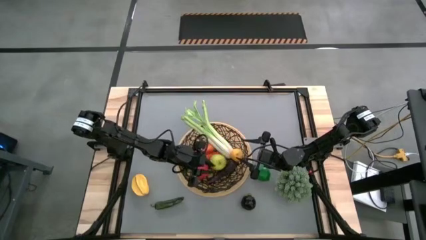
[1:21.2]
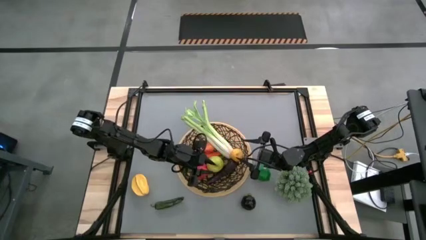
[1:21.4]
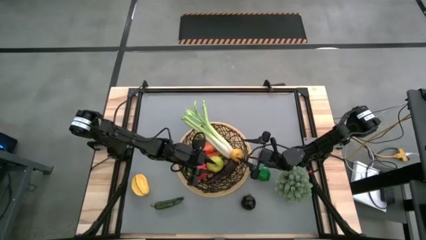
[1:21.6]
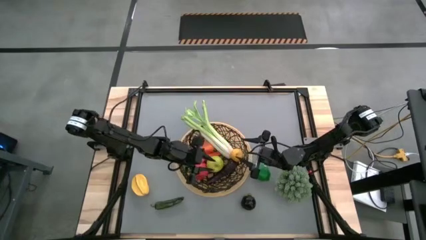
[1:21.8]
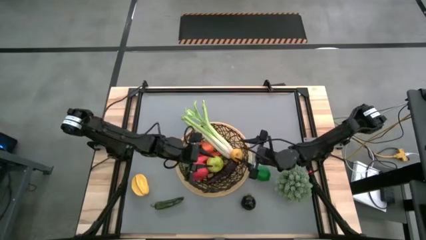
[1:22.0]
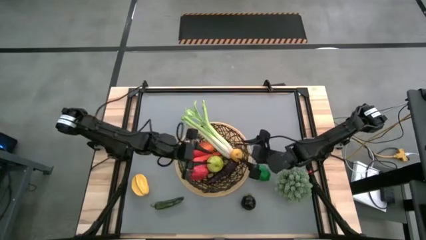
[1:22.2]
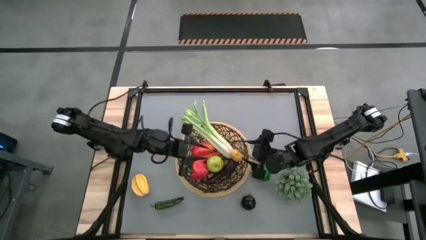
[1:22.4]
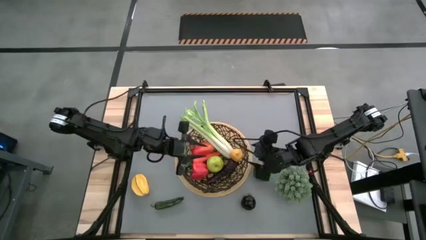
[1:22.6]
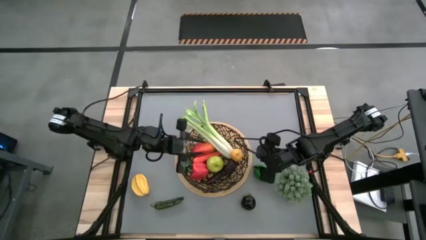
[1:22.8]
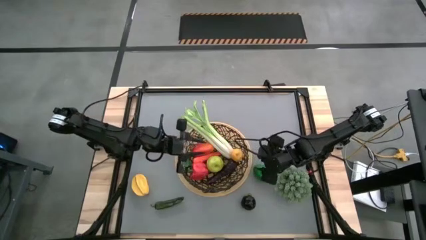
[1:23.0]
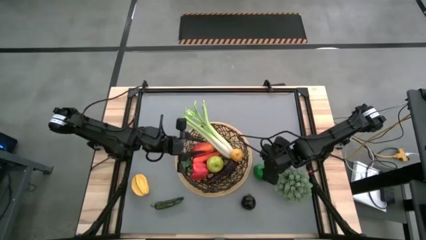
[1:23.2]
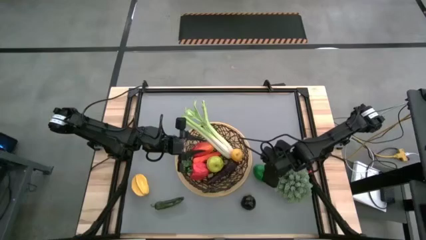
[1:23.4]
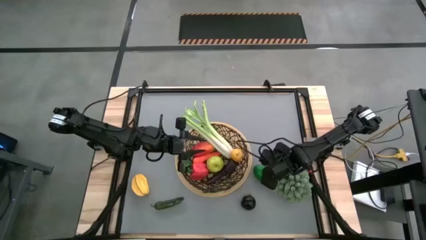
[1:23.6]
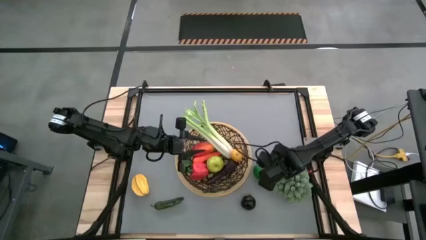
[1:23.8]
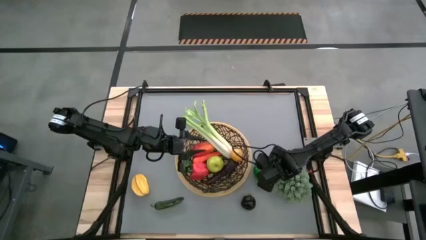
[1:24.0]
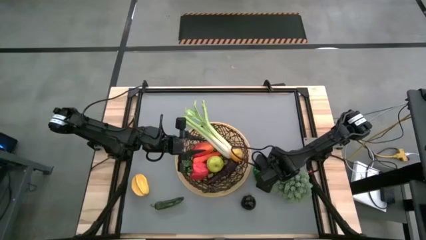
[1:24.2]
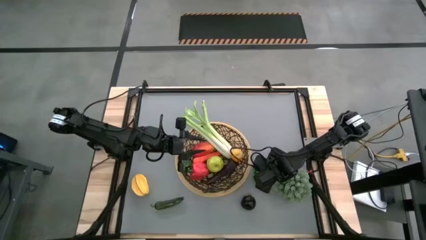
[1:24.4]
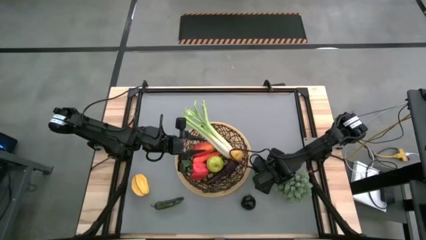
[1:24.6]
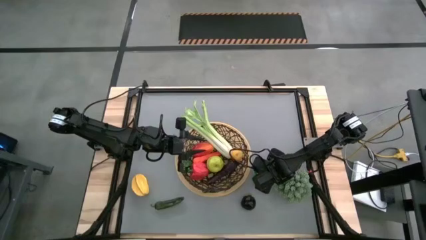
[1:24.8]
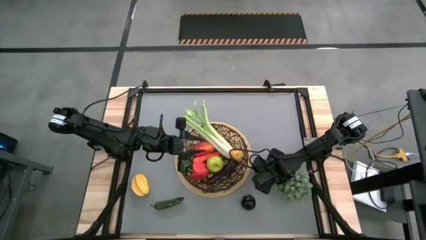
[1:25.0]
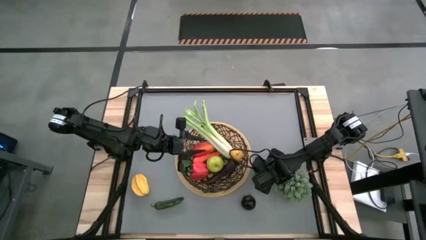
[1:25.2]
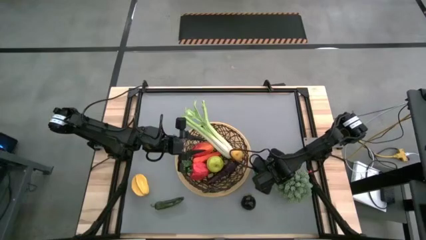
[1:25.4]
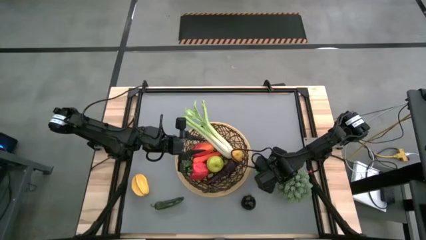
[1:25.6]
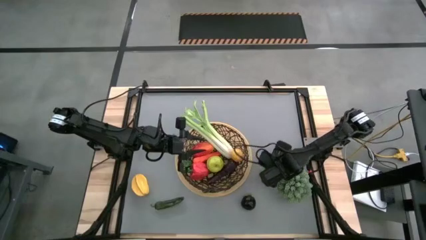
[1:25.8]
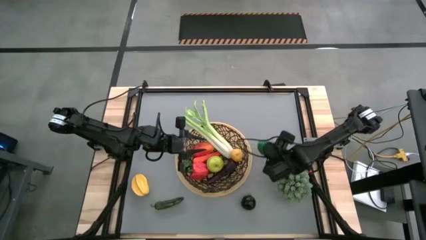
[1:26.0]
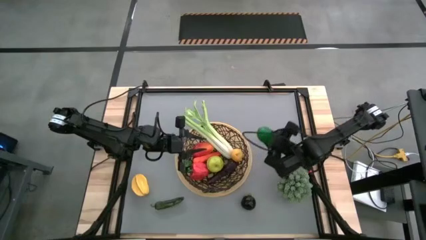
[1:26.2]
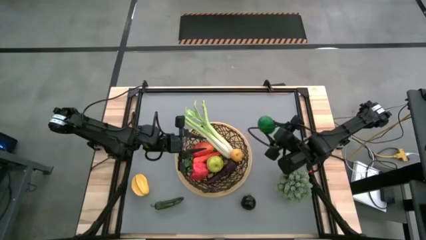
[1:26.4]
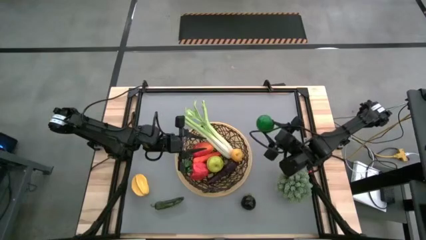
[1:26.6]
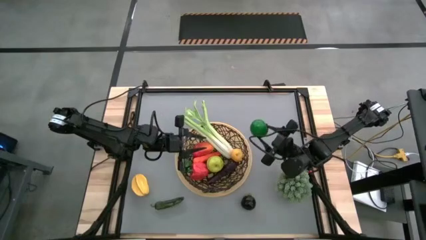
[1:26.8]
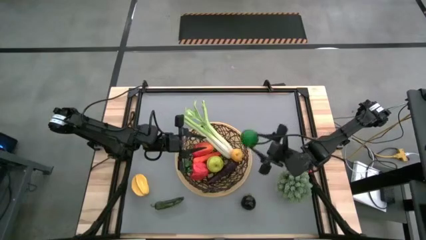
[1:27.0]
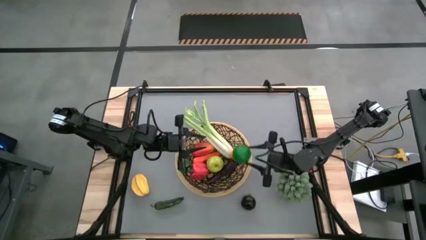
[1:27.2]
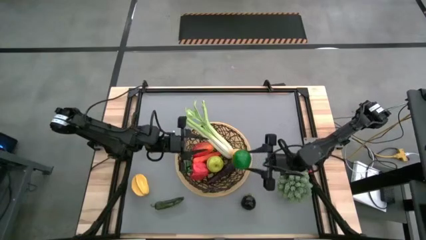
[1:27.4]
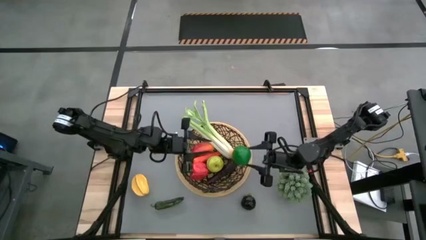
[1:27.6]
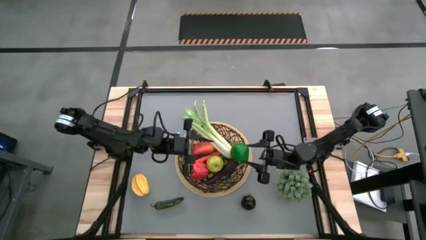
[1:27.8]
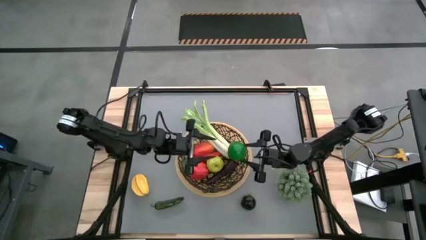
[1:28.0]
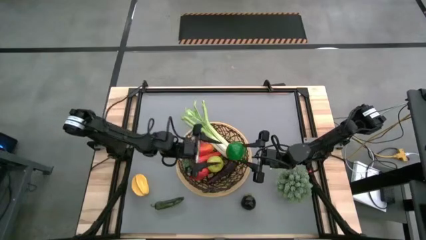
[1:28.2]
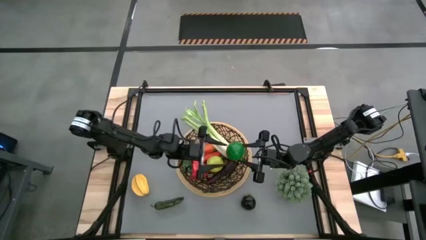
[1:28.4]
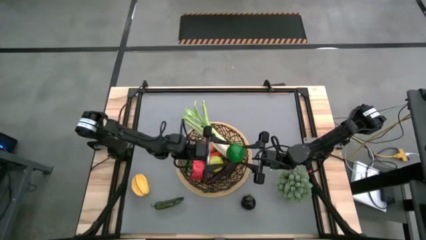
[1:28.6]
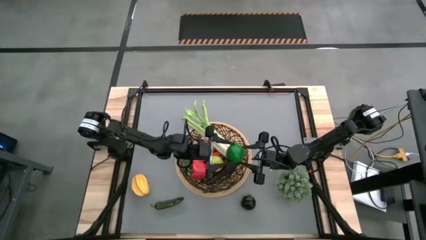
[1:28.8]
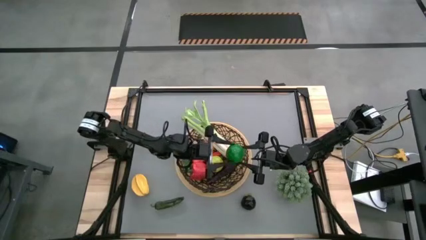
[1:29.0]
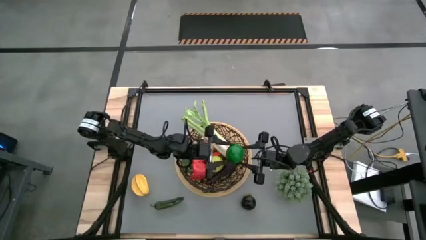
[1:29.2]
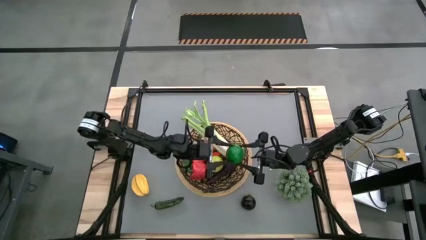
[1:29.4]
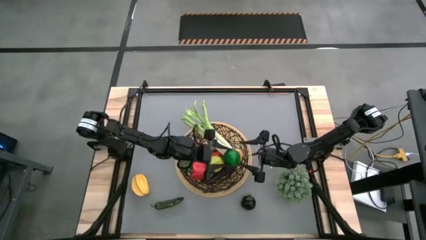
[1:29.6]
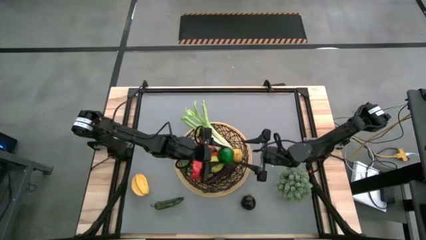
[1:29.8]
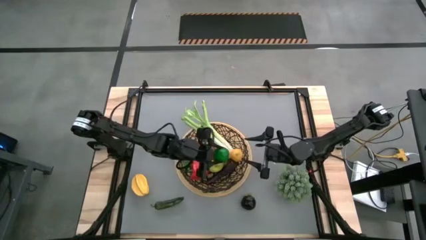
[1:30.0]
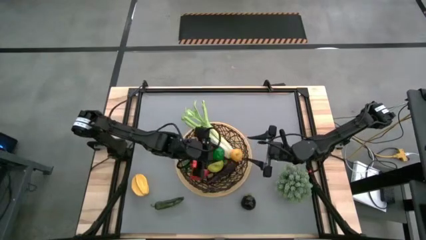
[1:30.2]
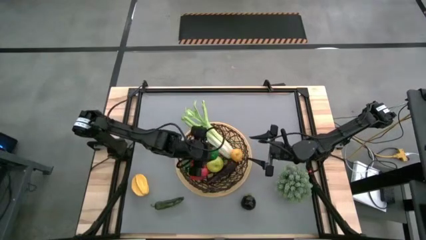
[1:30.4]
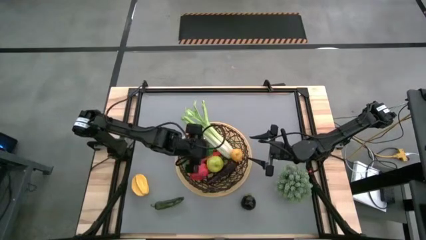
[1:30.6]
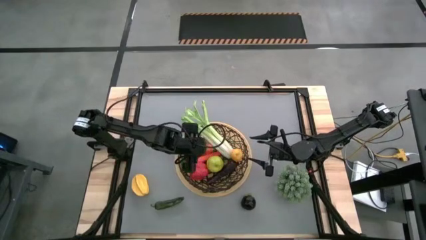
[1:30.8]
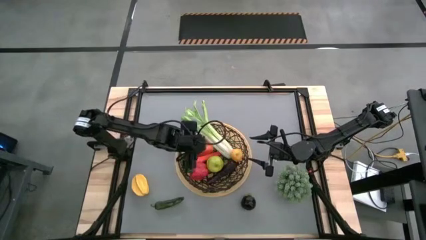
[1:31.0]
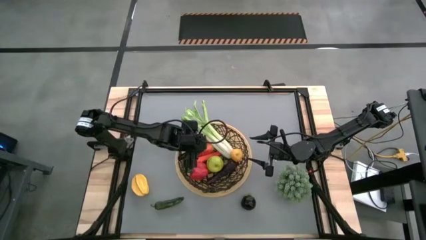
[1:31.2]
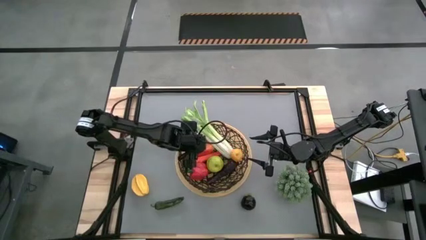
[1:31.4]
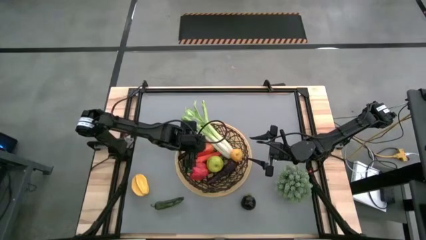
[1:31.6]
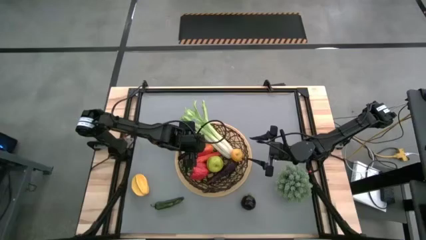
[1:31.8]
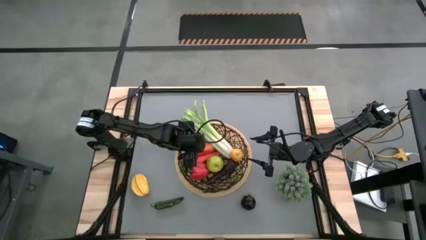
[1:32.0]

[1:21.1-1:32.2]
Task: Build produce basket
Put the lime into the wire basket

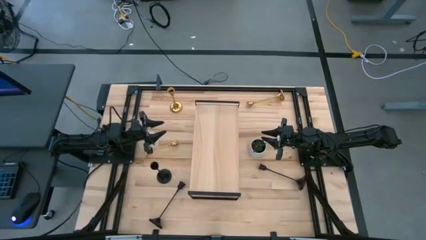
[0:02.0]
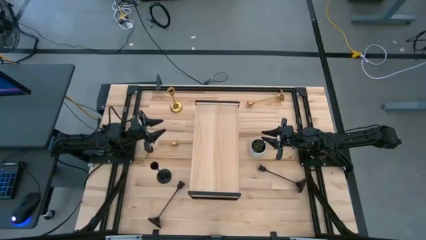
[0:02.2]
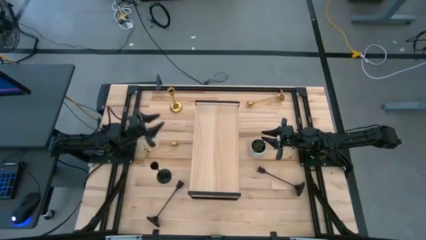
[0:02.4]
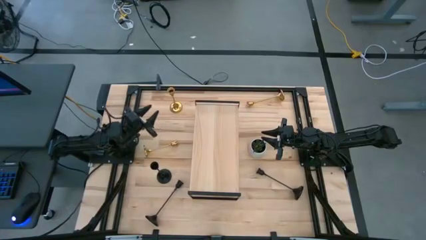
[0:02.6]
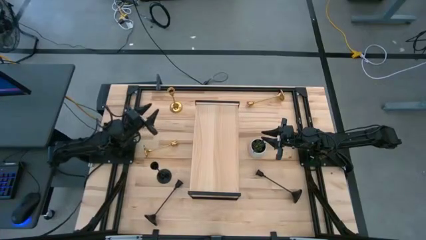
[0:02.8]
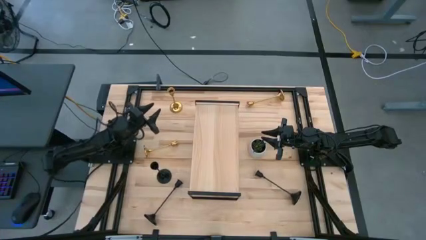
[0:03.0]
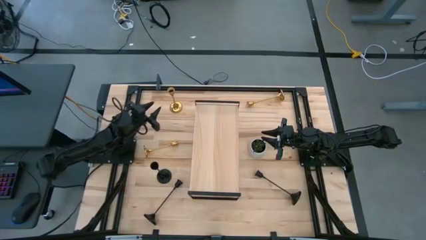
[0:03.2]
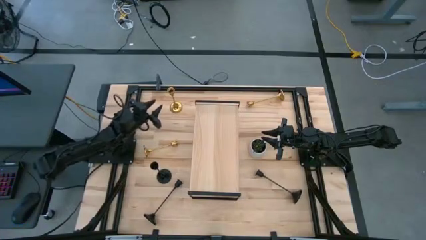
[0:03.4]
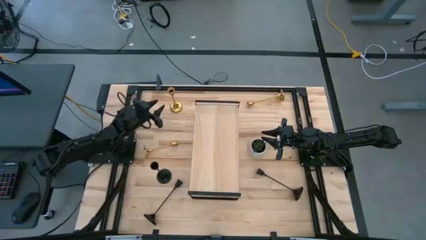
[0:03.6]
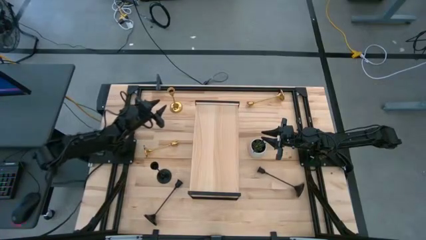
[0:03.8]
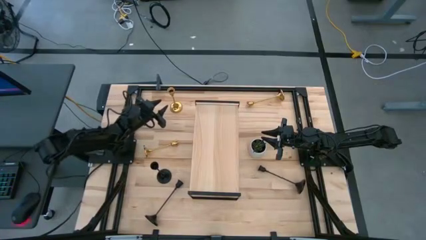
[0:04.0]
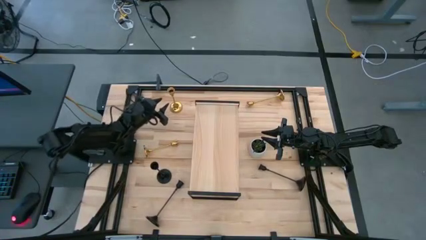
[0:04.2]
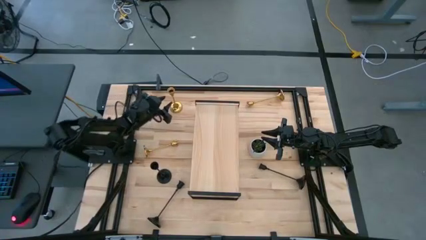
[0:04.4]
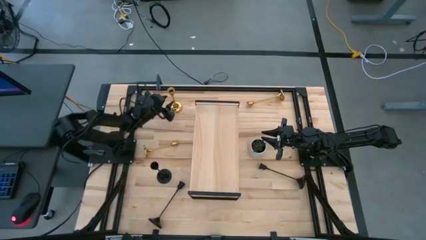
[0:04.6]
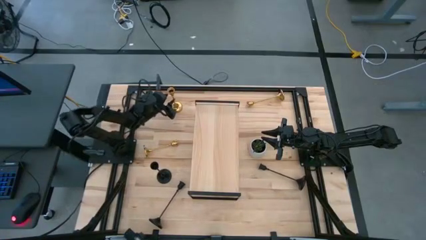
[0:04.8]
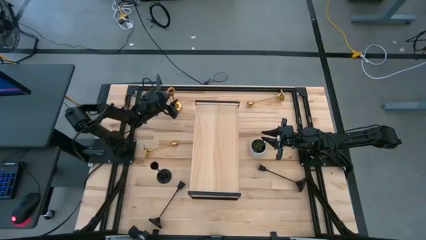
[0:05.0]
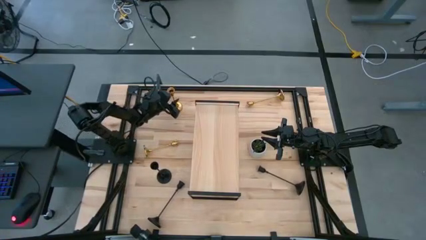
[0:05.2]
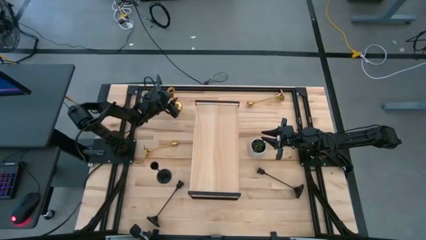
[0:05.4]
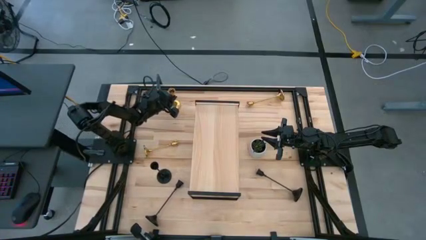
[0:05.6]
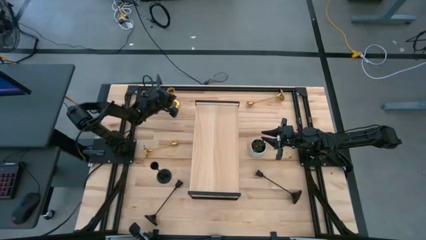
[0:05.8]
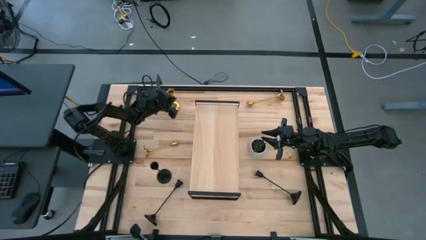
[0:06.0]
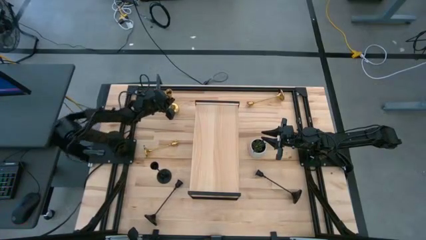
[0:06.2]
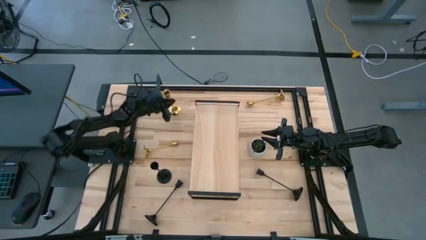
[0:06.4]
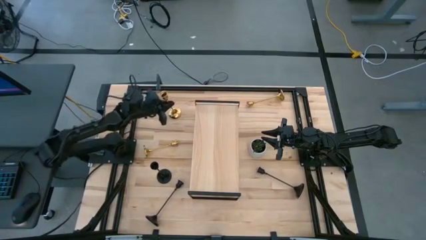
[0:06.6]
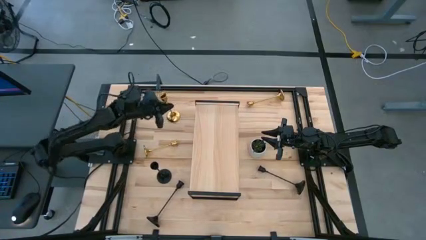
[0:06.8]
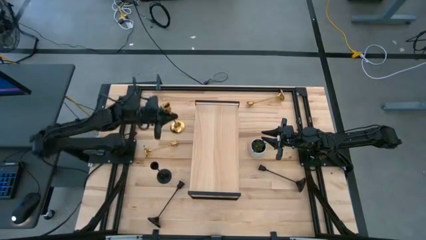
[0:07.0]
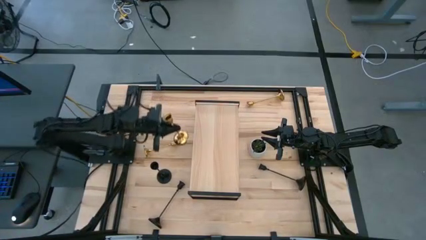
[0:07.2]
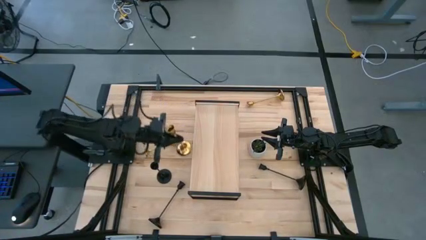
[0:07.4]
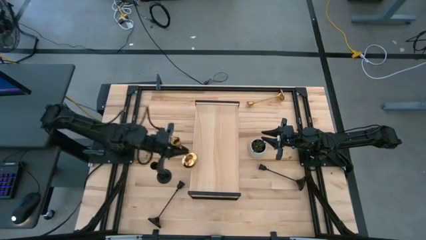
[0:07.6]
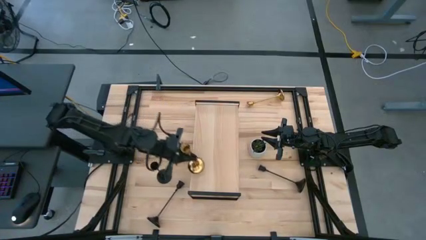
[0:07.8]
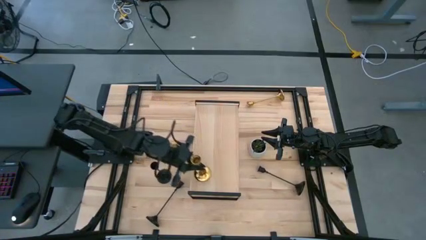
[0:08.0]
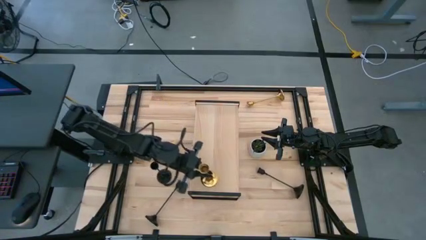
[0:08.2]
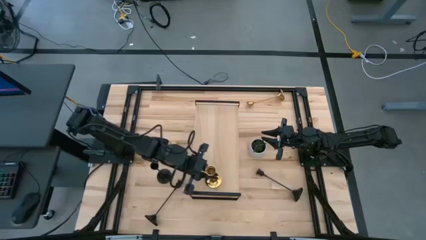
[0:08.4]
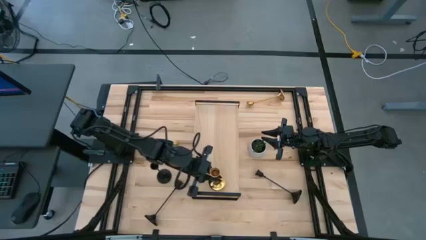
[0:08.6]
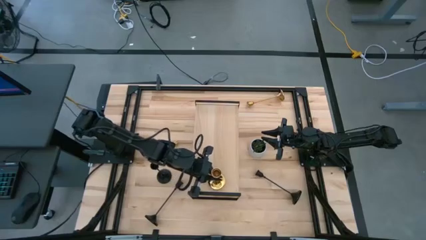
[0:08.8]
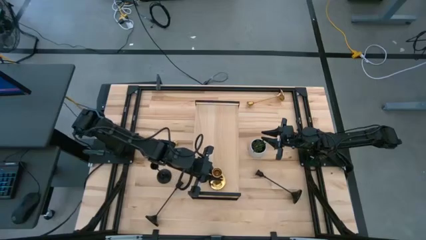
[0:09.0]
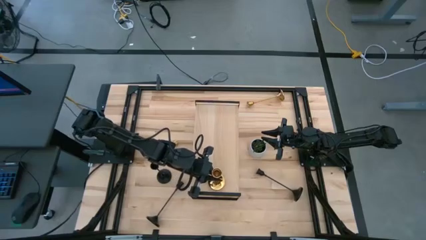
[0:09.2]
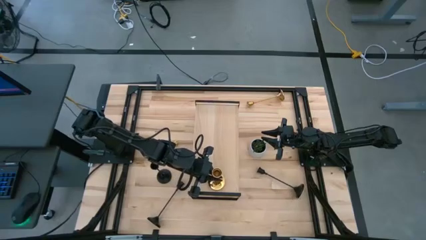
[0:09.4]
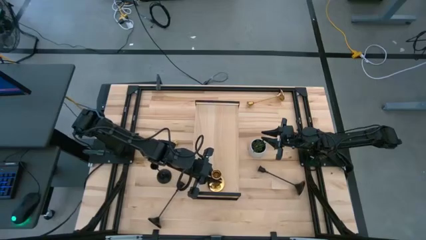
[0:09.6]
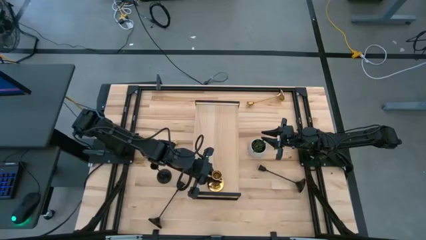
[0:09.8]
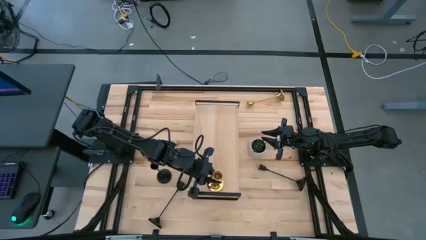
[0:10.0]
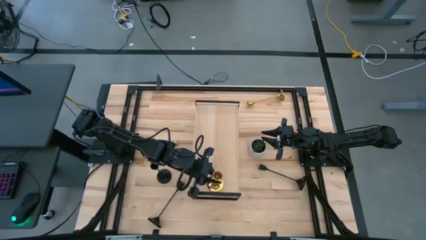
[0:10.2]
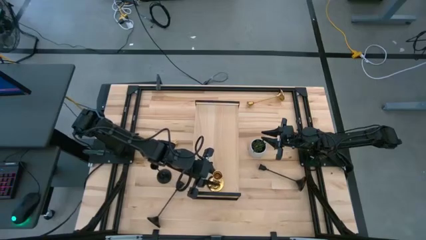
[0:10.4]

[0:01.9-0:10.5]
Task: Pick & Place candle stick holders
Put the top left gold candle holder on the shelf
